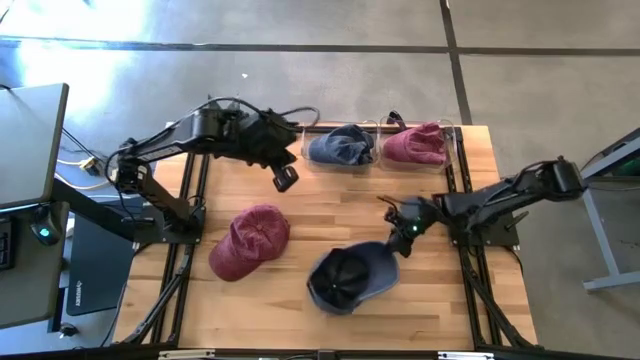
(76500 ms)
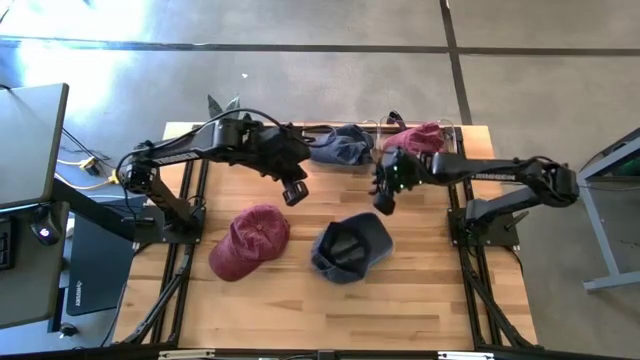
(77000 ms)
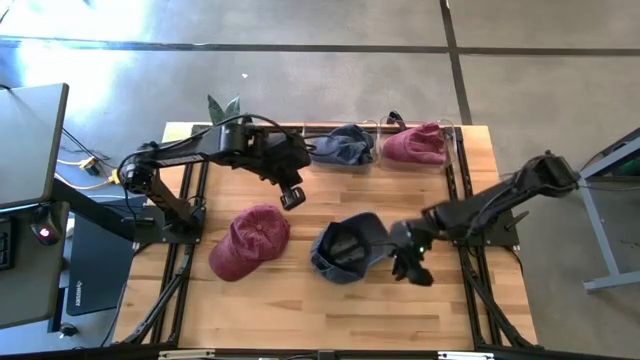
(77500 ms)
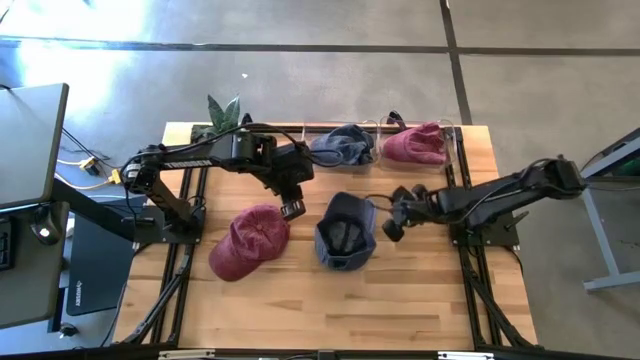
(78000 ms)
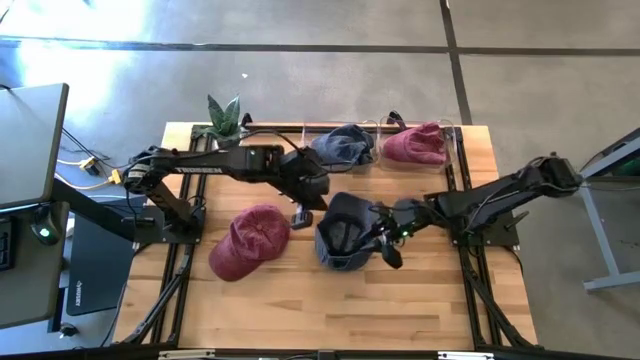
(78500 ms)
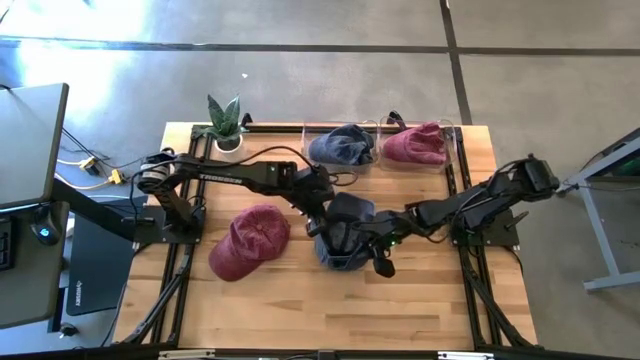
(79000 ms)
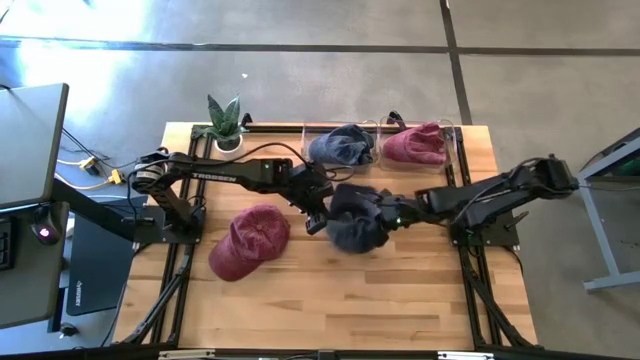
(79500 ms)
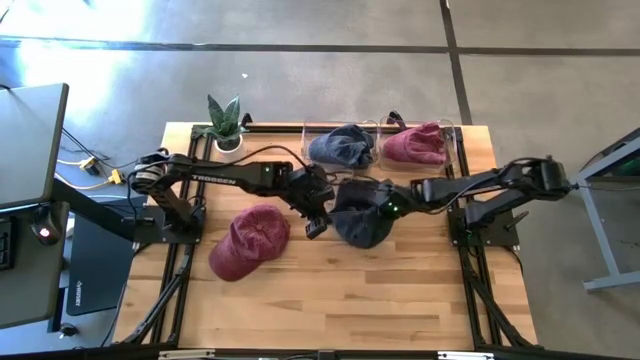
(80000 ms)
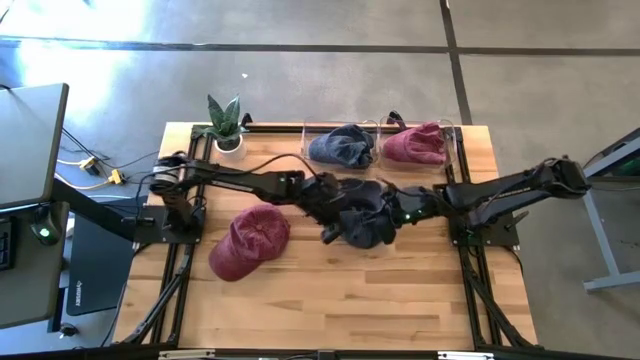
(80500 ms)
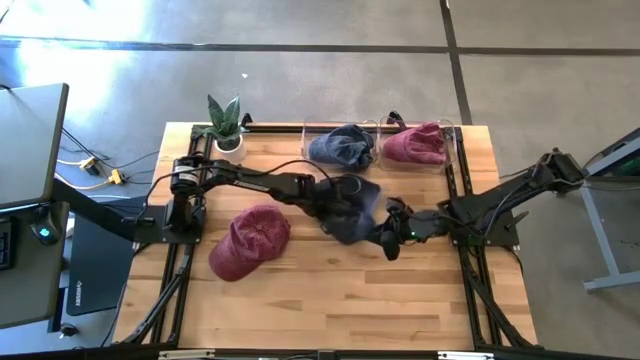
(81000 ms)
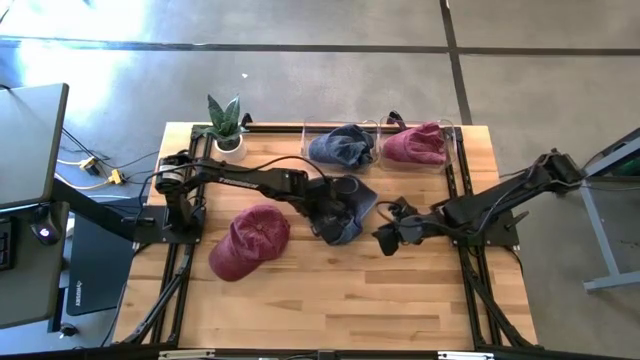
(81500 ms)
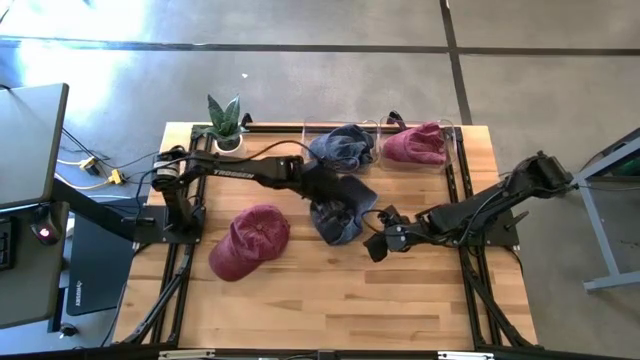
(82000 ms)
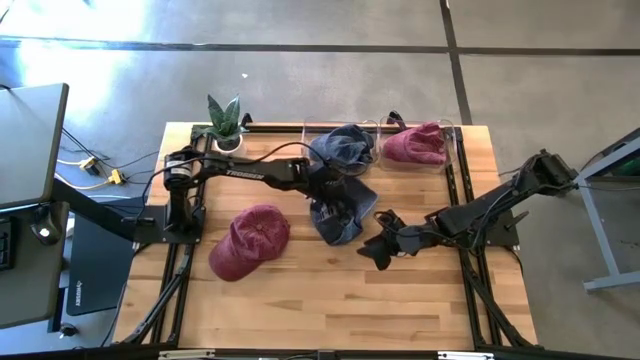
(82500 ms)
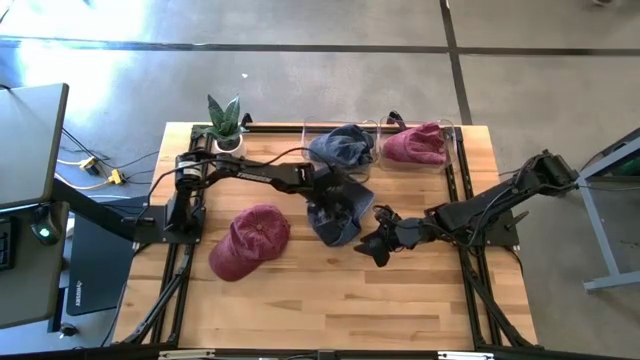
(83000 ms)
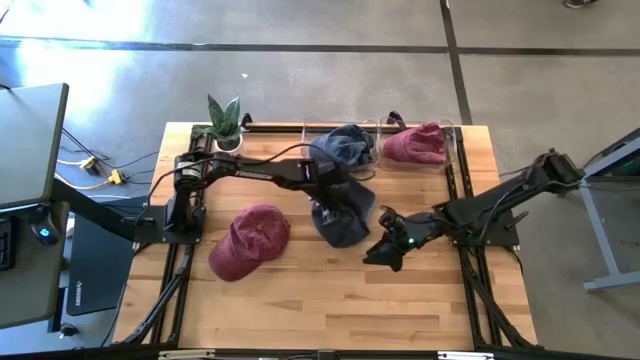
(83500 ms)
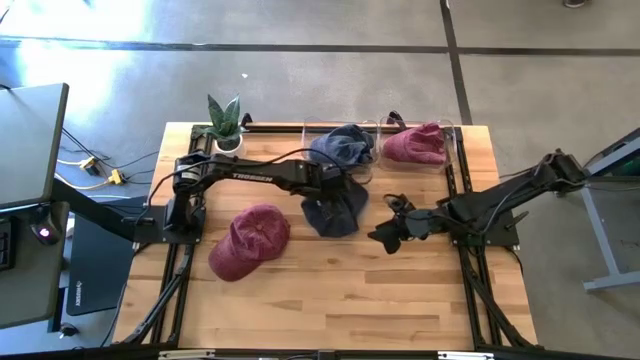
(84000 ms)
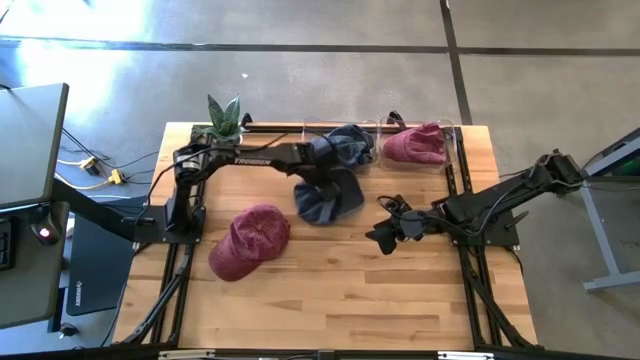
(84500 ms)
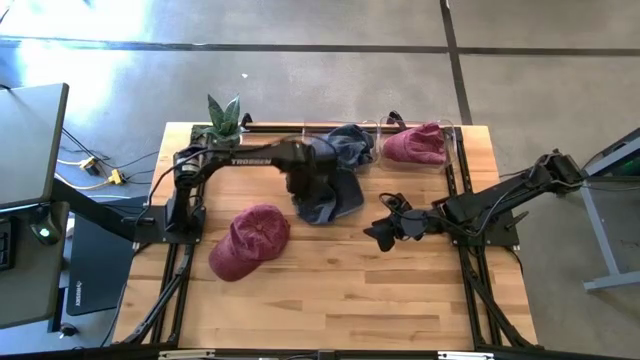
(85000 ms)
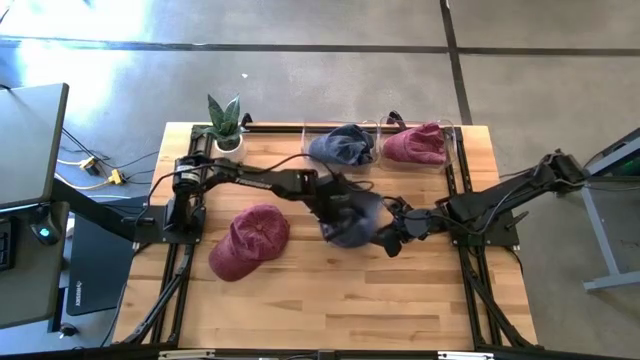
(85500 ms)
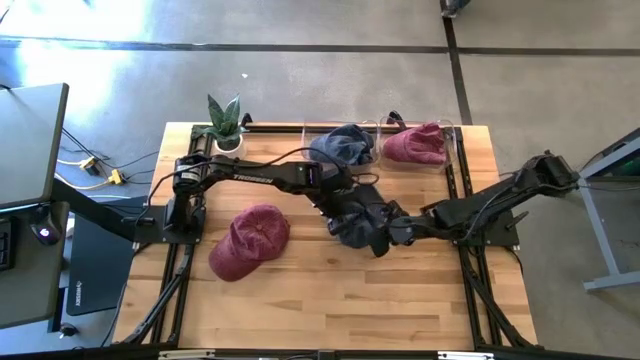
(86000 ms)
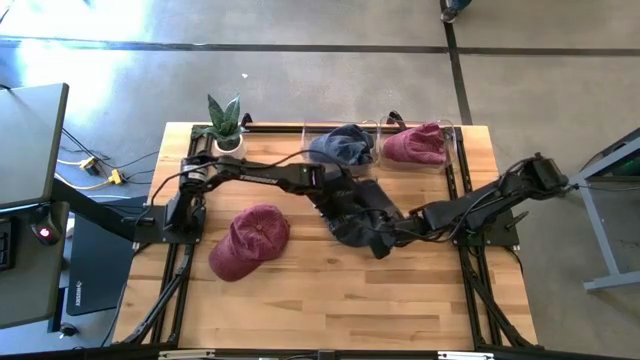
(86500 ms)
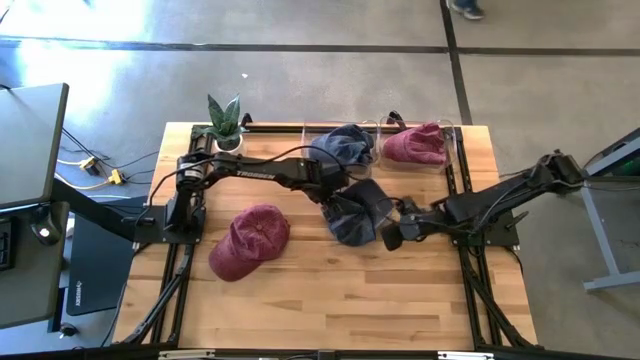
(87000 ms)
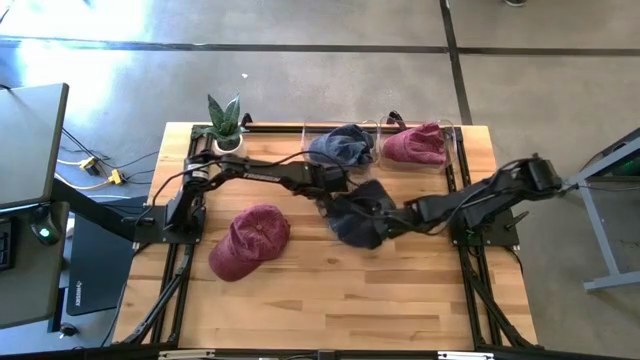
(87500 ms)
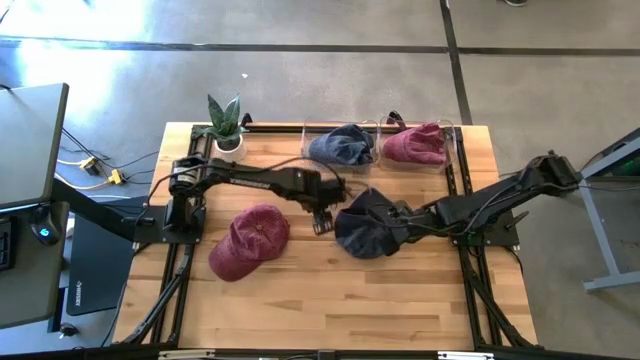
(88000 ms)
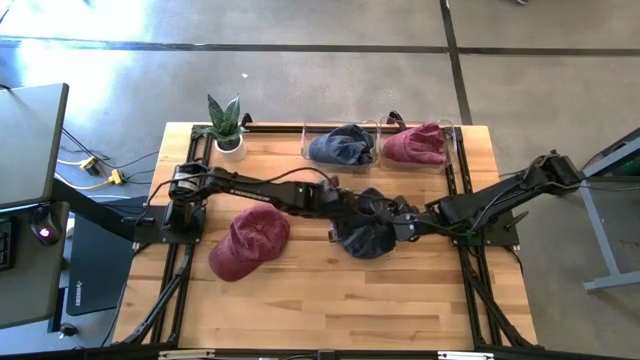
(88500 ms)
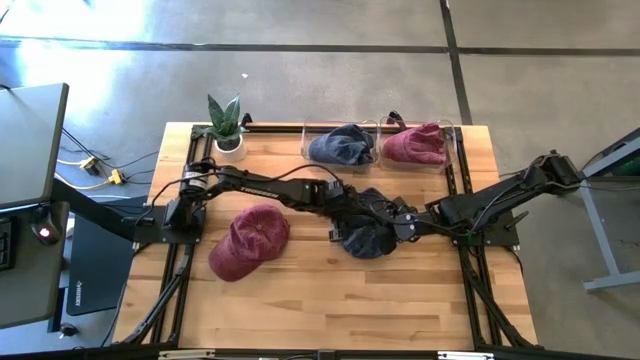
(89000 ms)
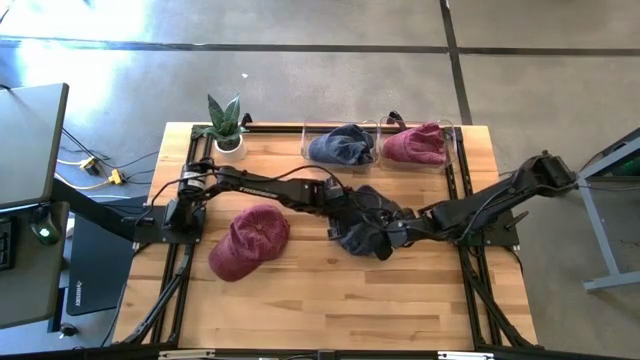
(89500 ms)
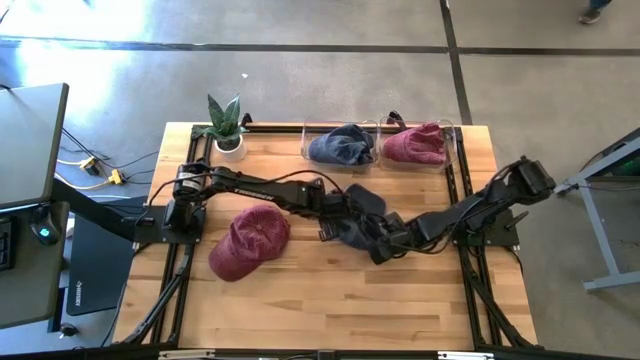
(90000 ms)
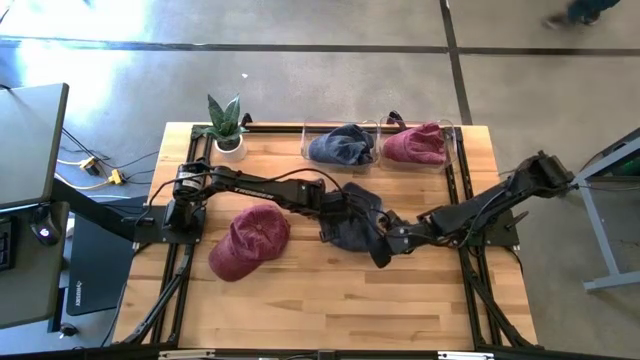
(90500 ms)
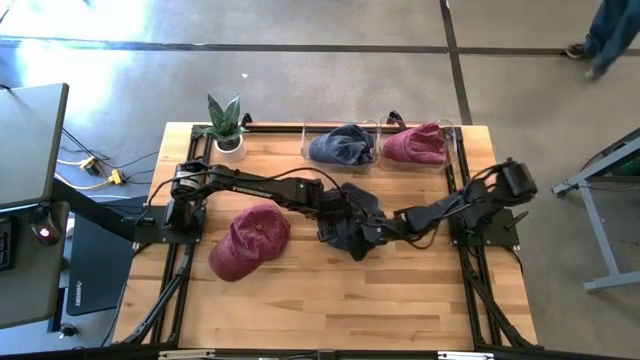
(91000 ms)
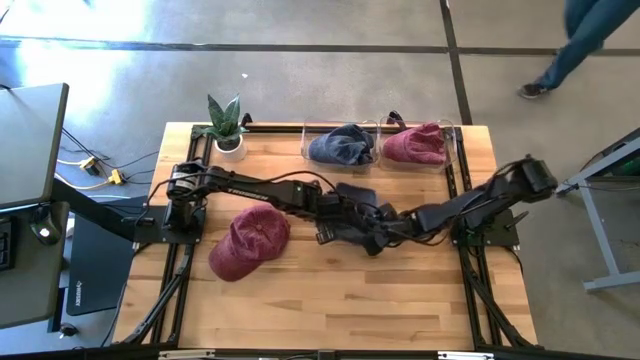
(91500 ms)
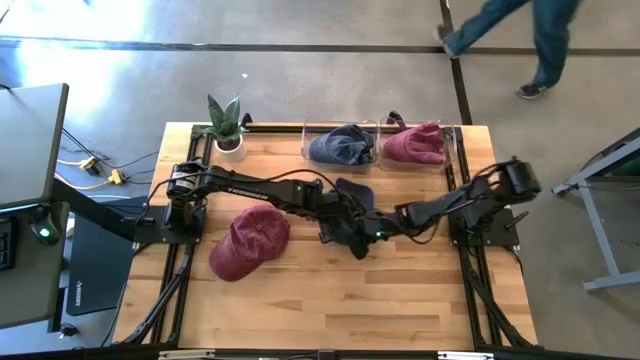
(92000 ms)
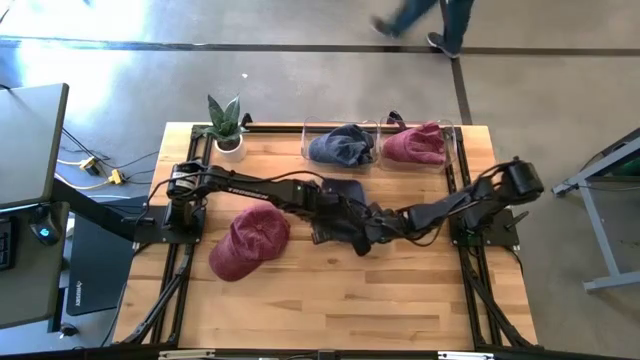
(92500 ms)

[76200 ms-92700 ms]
Task: Pick & Place hat
Put the dark blue cap into the left transparent bin

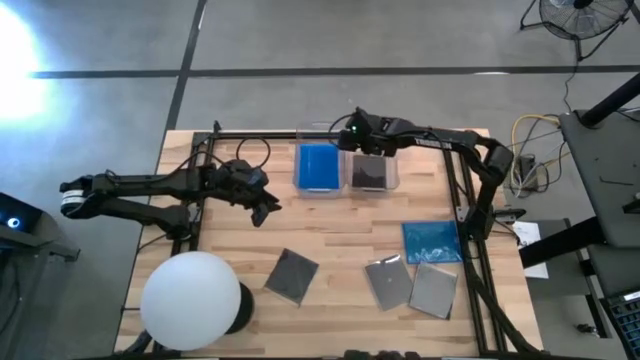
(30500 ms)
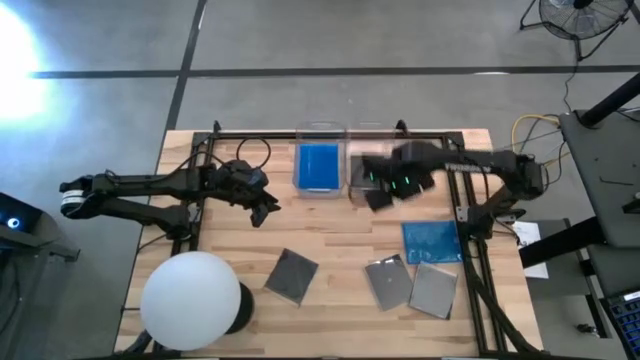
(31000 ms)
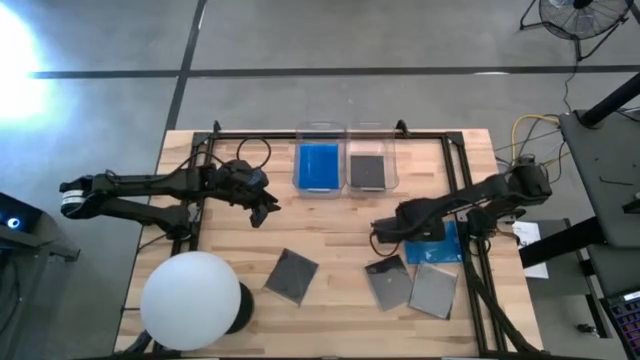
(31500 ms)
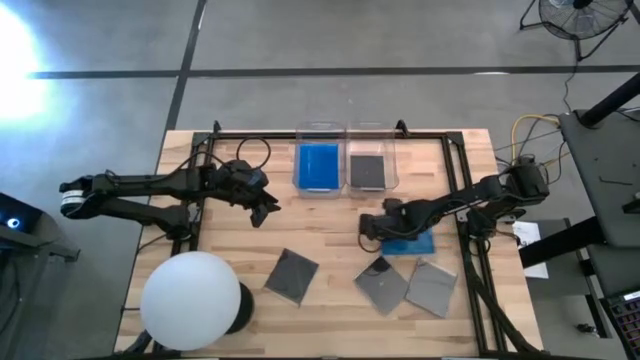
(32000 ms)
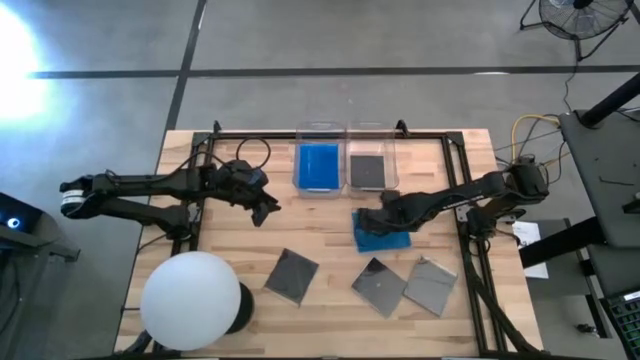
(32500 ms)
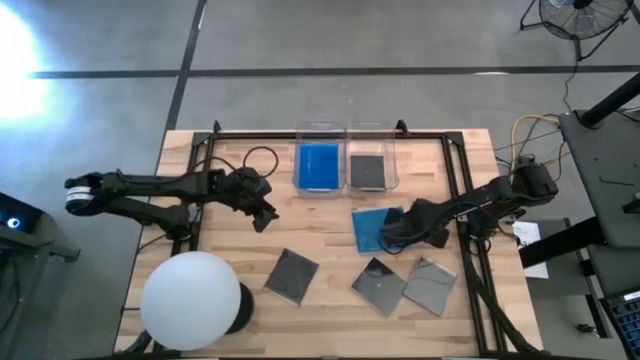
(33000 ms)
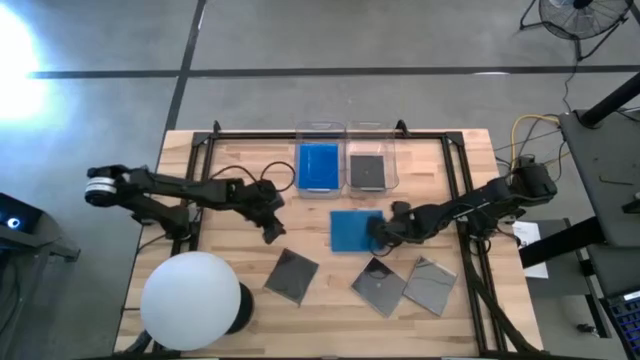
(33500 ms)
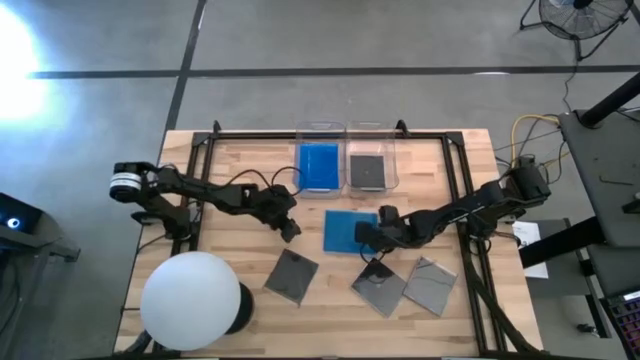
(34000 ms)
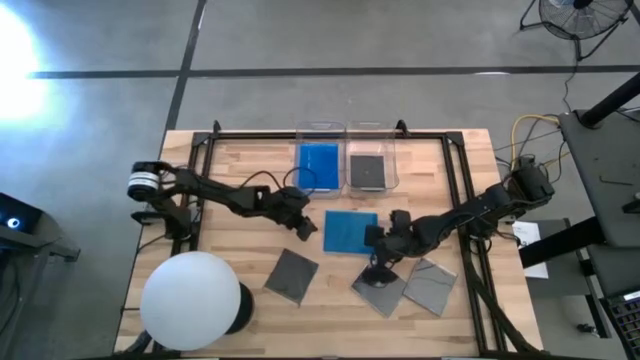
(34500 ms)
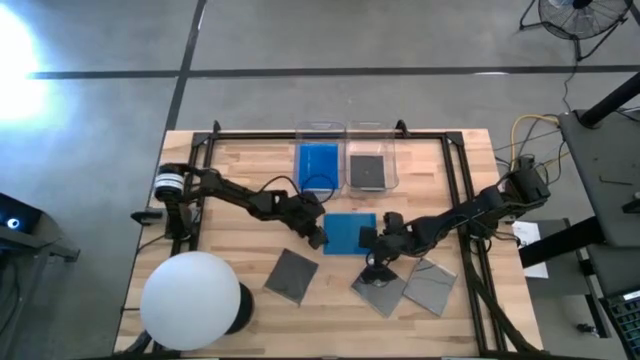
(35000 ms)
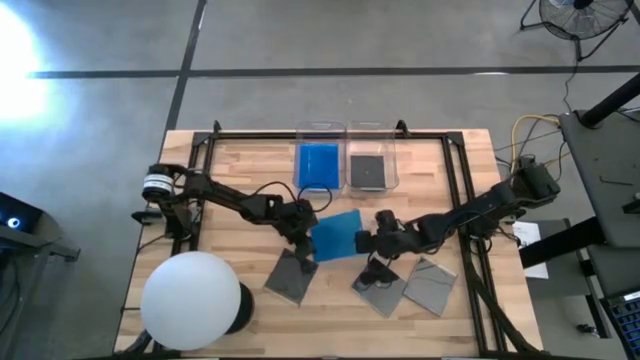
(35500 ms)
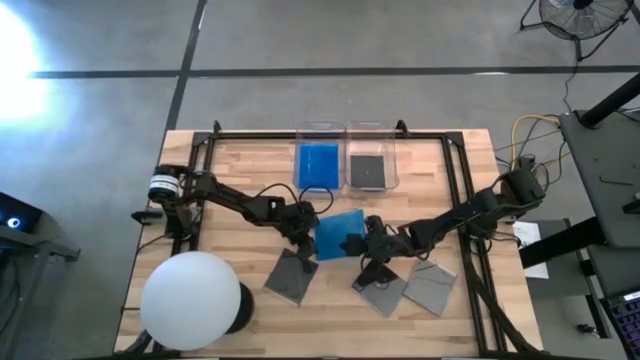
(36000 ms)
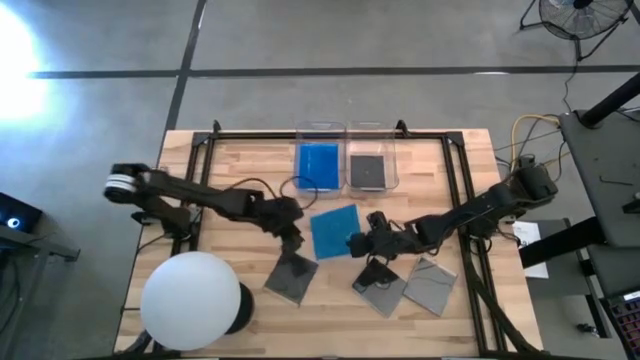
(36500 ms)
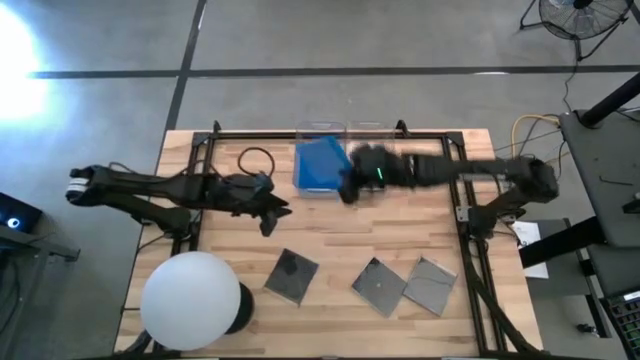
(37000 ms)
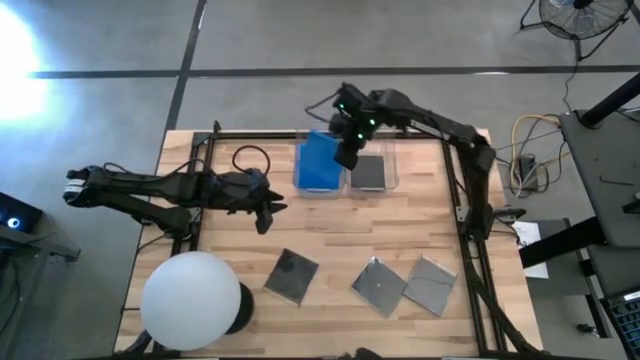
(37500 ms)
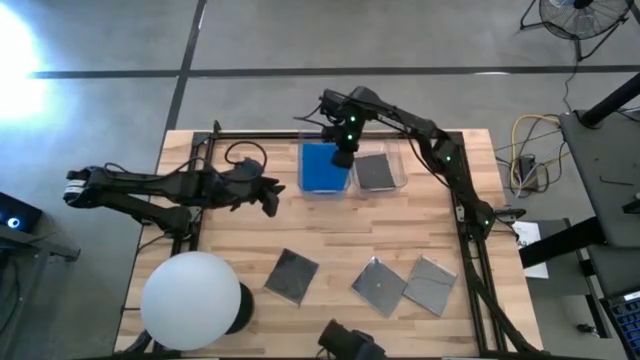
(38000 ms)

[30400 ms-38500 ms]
Task: Pick & place jewel cases by type
Put the blue CD case into the left transparent bin
